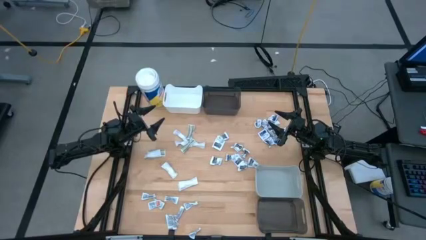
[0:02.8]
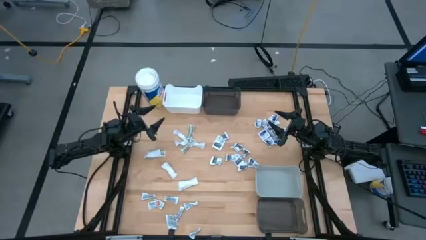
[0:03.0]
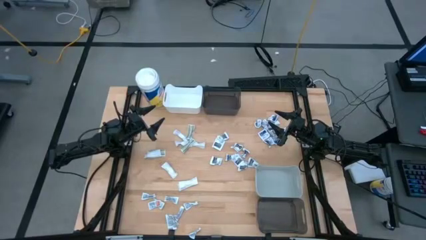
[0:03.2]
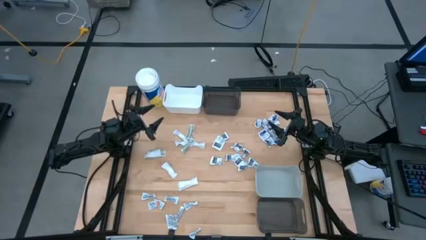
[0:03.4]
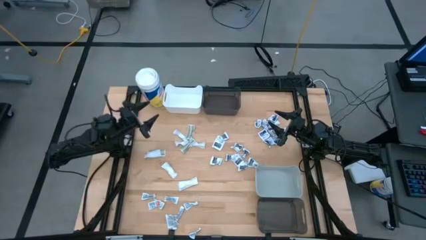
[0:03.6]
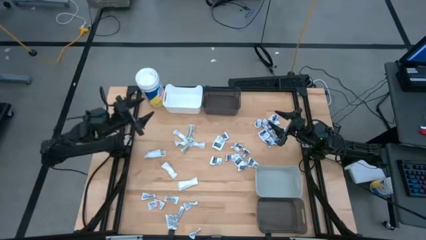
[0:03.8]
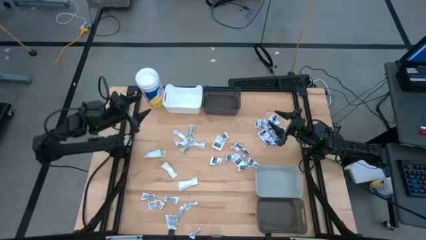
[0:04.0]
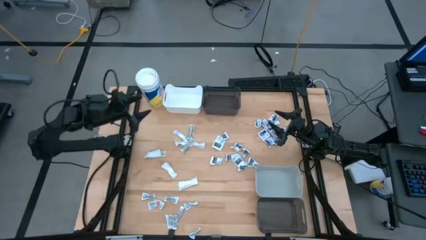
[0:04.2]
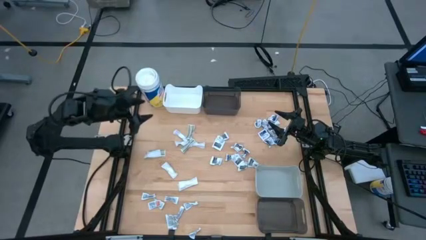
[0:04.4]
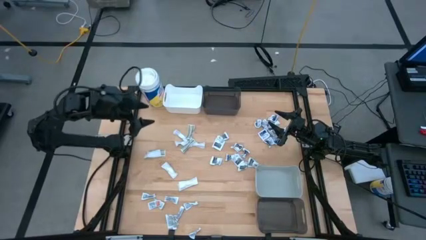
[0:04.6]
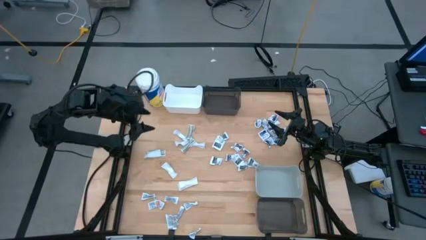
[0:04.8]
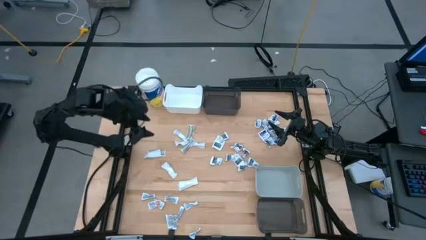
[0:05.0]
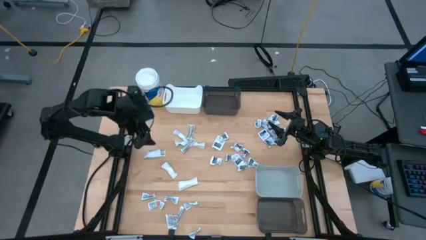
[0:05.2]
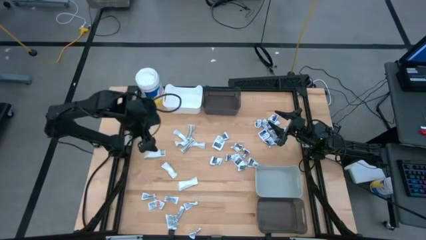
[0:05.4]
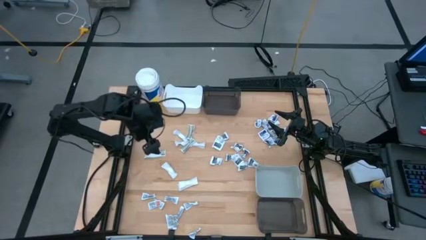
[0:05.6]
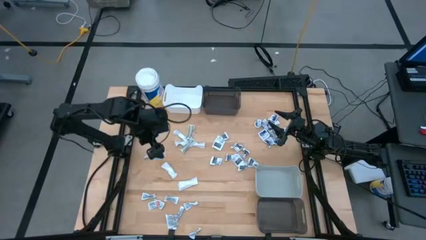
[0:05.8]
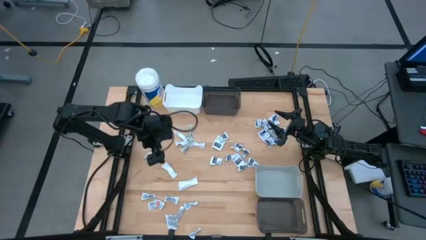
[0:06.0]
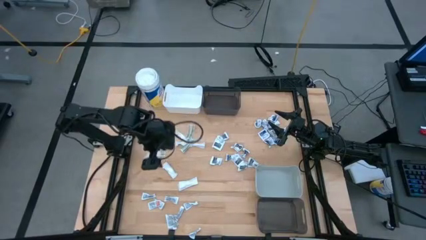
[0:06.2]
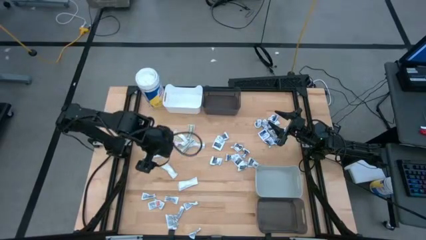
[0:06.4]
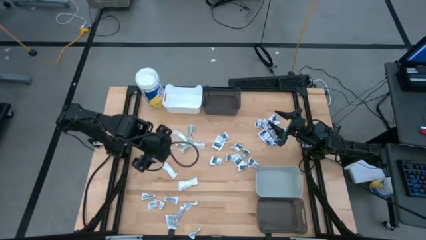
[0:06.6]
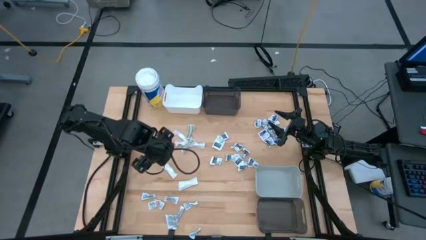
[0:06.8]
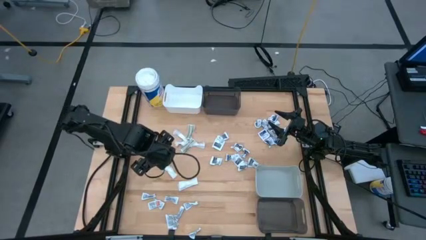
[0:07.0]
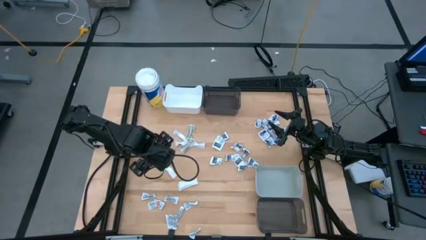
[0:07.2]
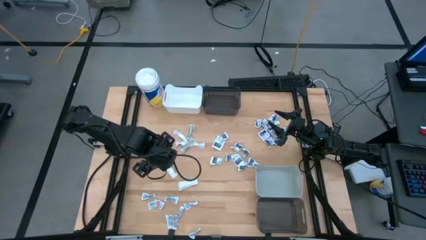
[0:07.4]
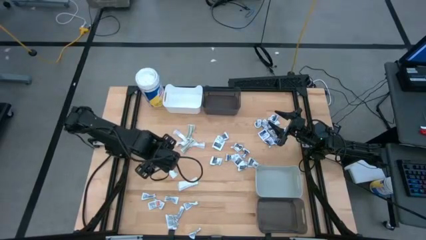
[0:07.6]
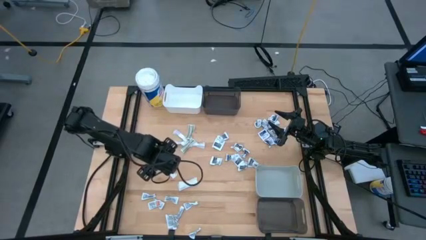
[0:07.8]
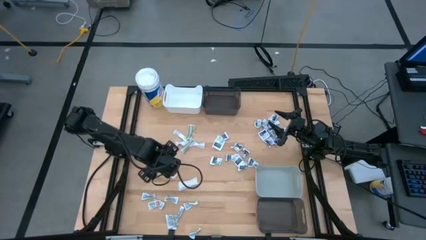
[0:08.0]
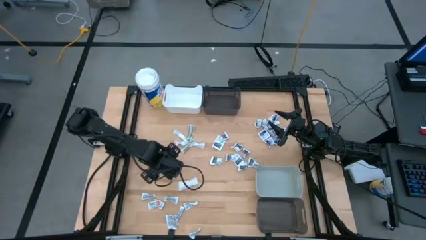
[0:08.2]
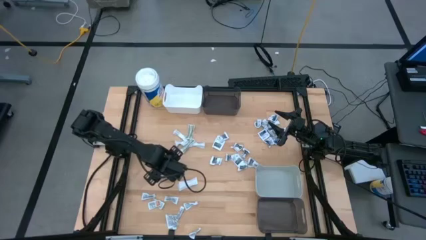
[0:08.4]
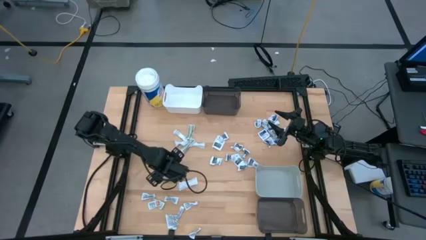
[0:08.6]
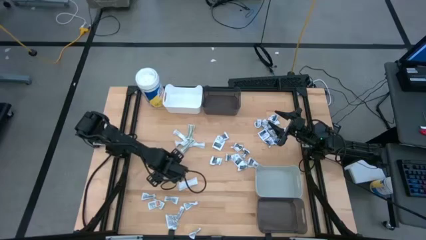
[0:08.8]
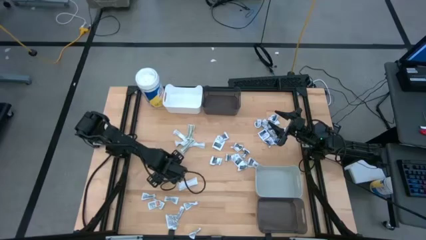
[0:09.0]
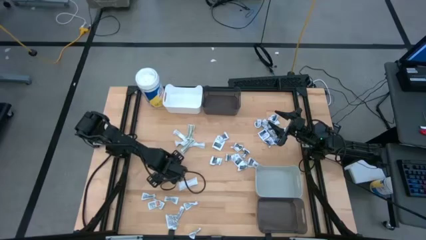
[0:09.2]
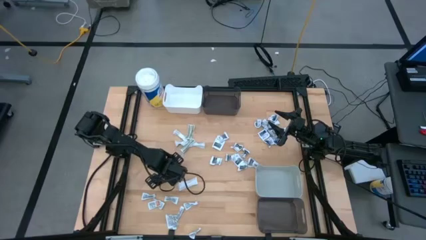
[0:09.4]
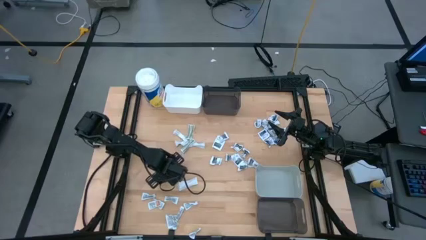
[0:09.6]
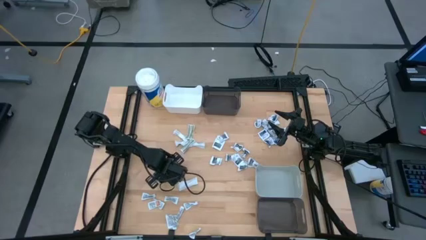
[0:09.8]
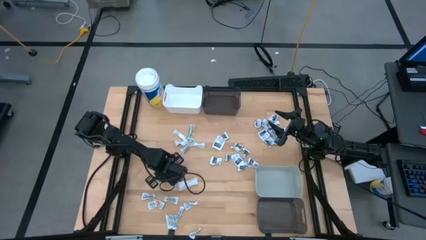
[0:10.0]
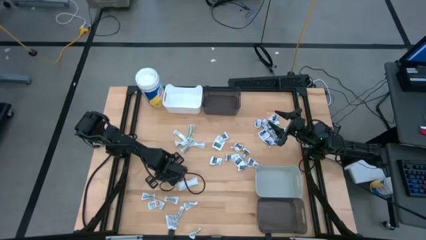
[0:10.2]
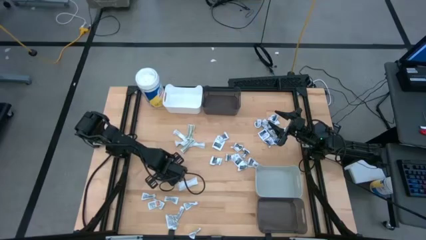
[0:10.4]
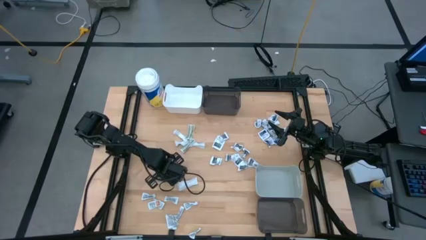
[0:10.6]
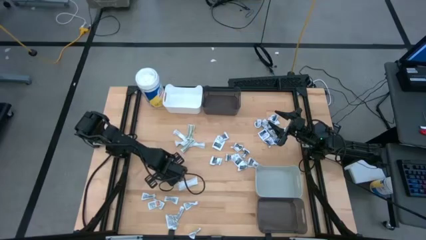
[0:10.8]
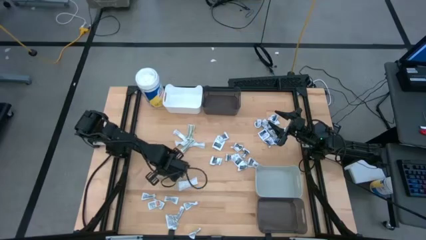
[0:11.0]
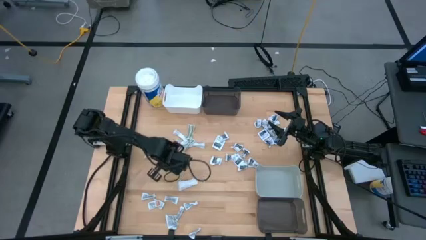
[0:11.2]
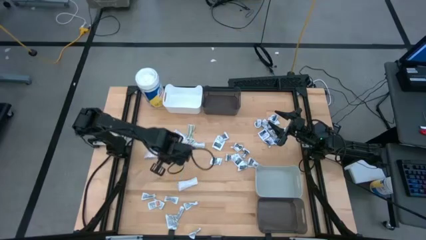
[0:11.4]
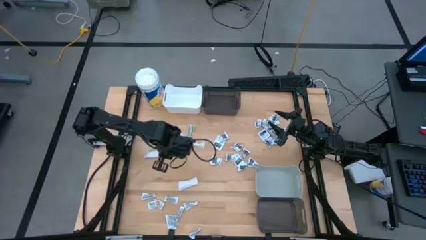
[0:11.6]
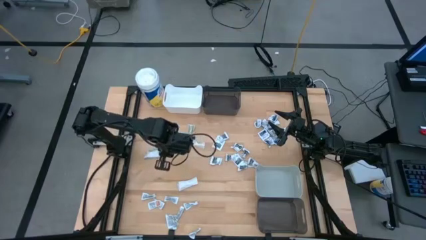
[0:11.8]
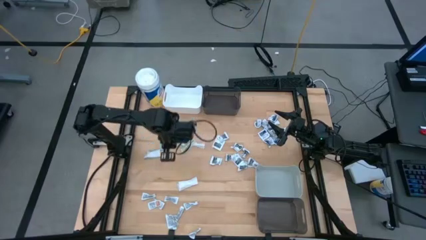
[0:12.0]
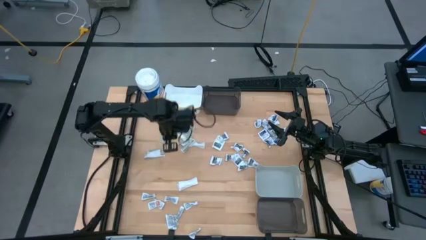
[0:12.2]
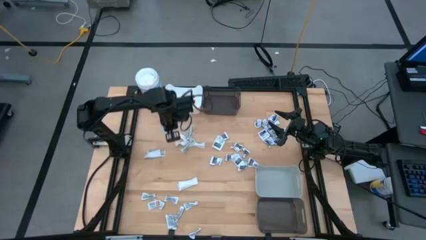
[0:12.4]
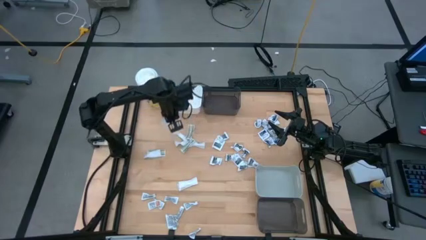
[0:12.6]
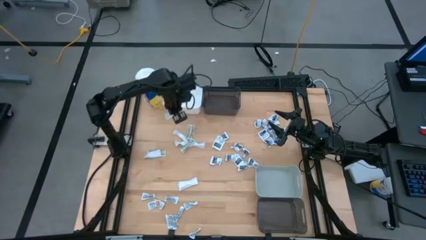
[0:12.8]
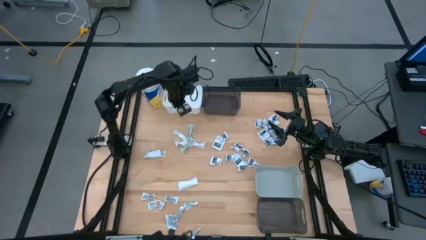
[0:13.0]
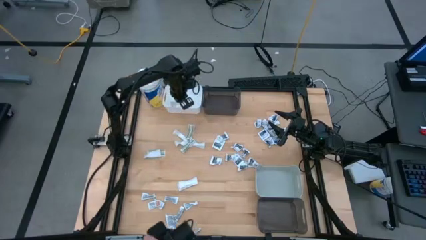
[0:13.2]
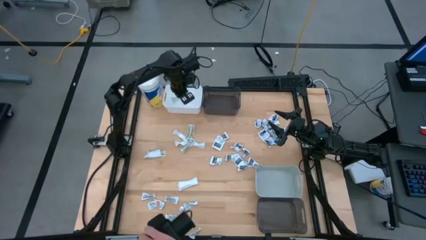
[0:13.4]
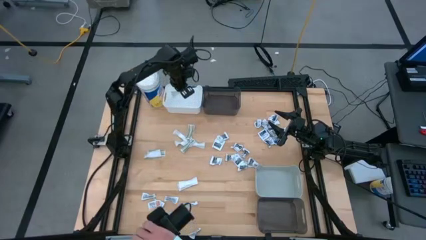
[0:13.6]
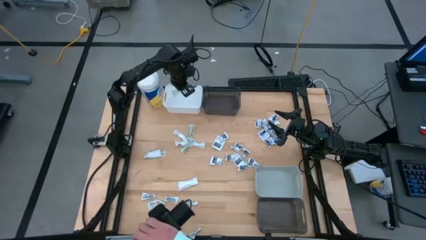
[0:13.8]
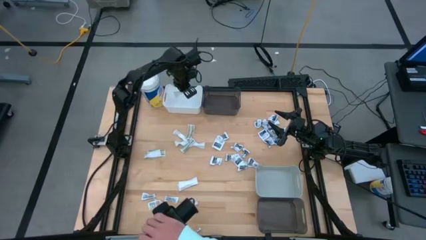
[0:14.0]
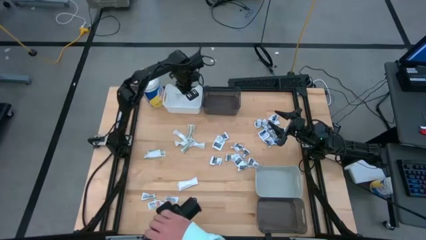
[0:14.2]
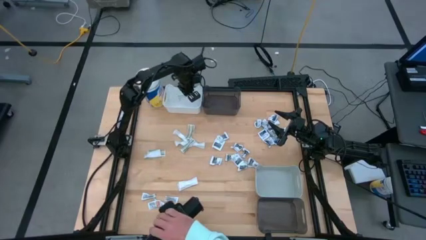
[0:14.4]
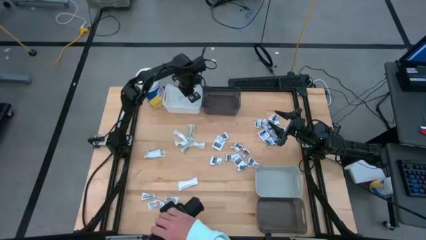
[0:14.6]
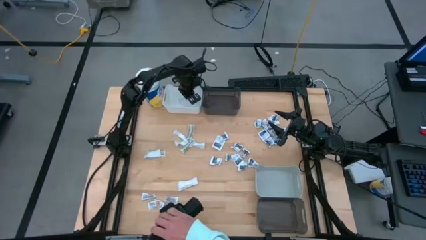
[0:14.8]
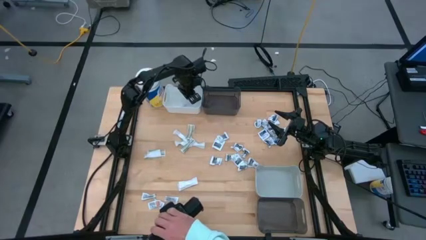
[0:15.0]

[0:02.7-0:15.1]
Task: Pick & Place First Aid Supplies
Put the green bandage into the white bin
